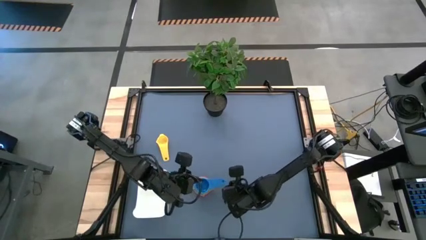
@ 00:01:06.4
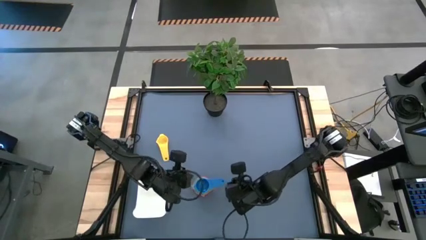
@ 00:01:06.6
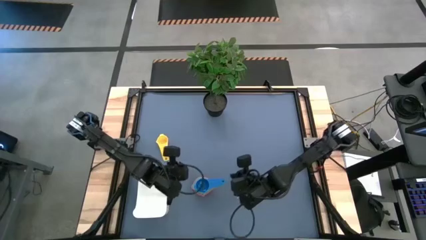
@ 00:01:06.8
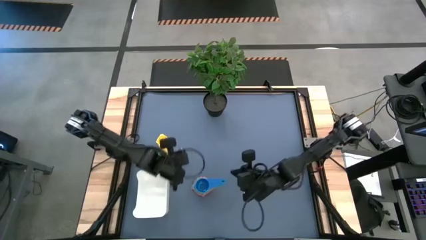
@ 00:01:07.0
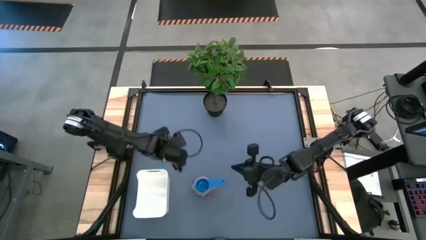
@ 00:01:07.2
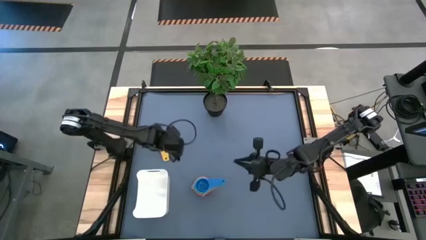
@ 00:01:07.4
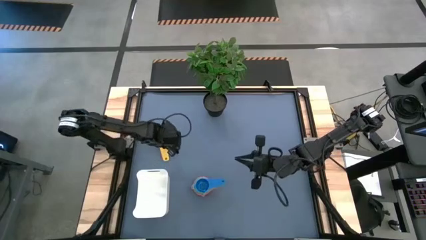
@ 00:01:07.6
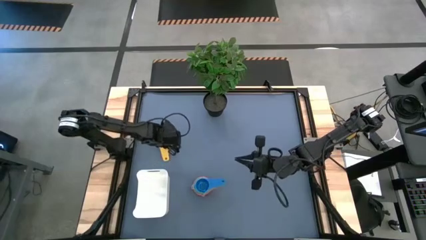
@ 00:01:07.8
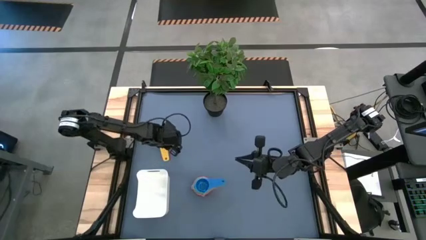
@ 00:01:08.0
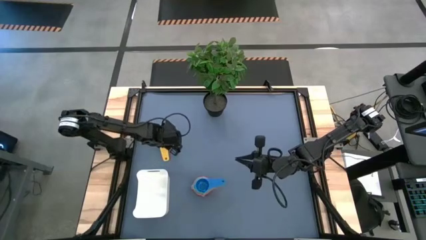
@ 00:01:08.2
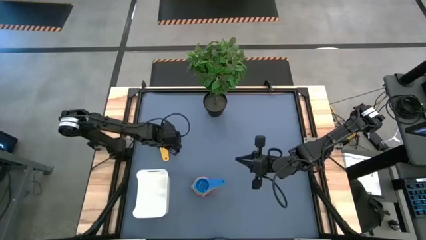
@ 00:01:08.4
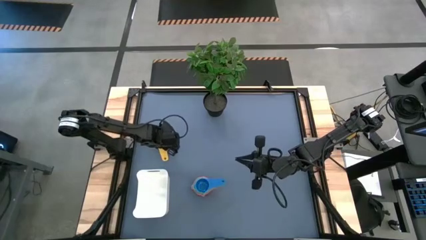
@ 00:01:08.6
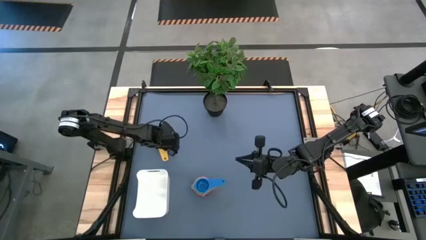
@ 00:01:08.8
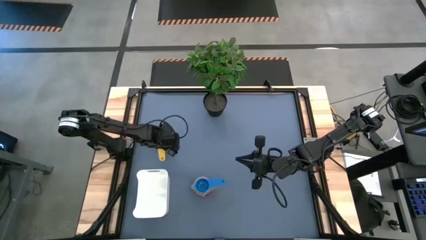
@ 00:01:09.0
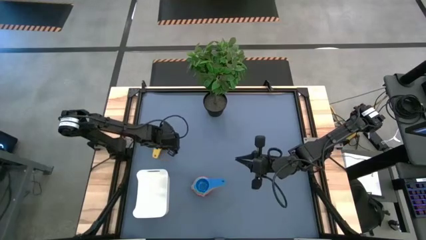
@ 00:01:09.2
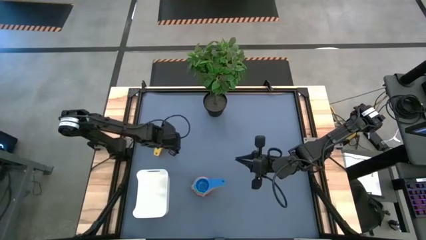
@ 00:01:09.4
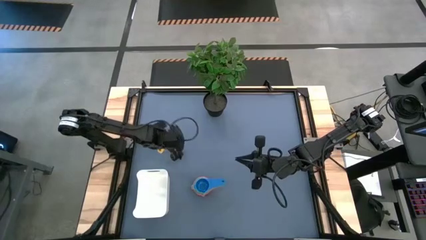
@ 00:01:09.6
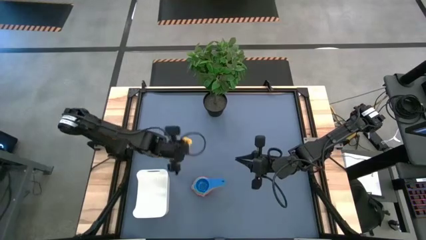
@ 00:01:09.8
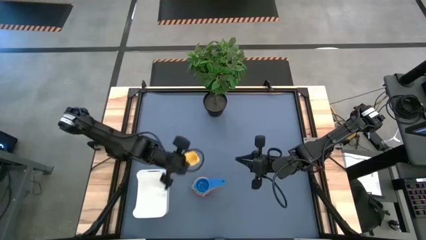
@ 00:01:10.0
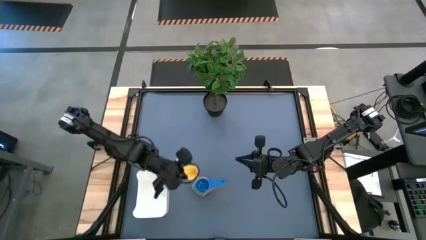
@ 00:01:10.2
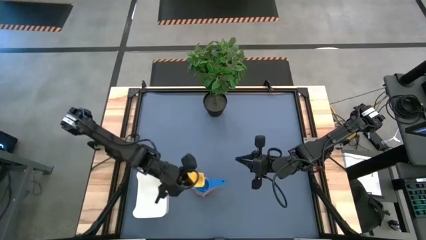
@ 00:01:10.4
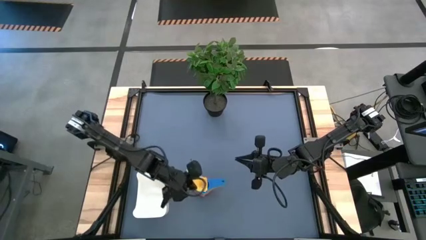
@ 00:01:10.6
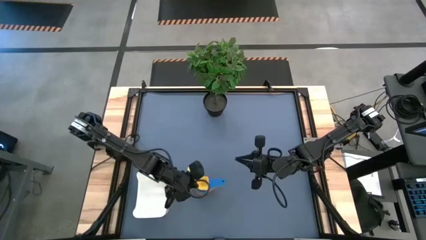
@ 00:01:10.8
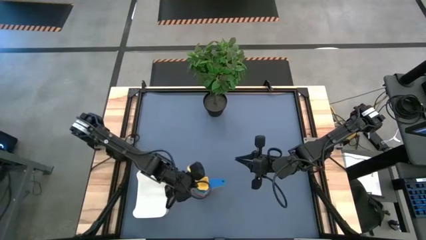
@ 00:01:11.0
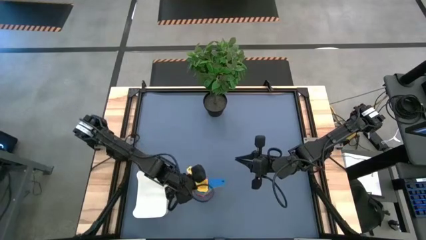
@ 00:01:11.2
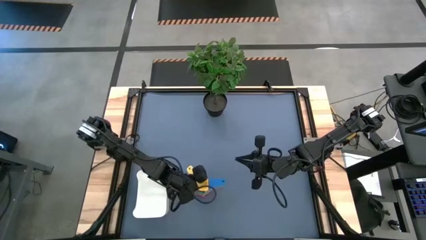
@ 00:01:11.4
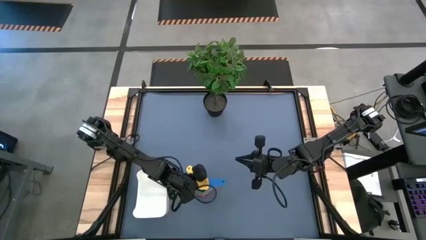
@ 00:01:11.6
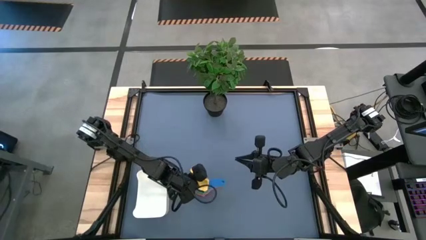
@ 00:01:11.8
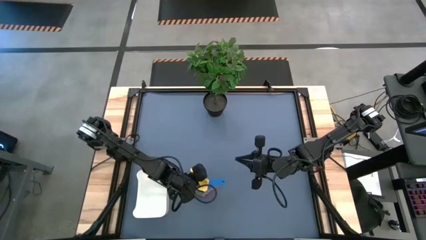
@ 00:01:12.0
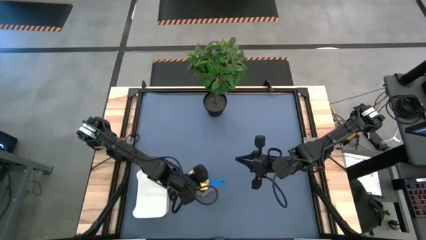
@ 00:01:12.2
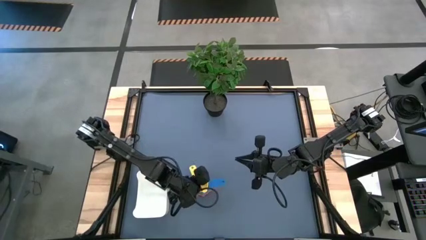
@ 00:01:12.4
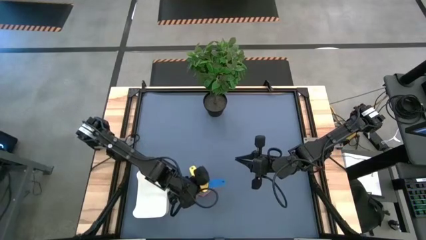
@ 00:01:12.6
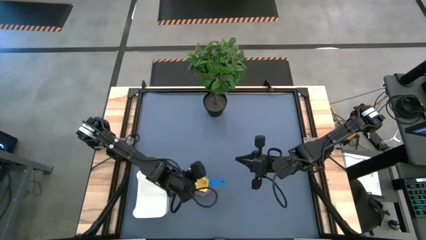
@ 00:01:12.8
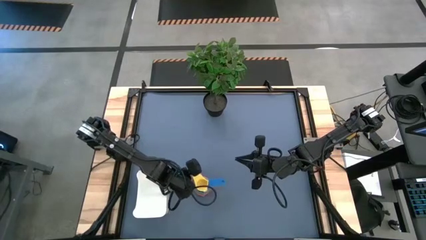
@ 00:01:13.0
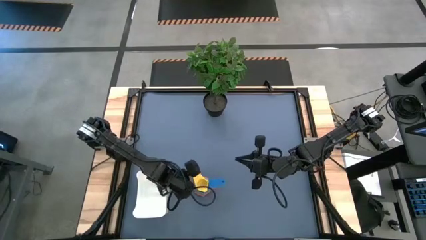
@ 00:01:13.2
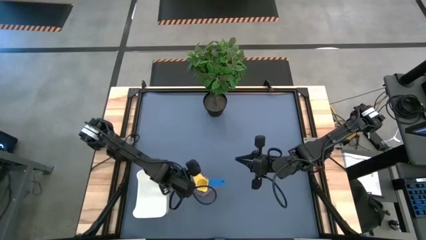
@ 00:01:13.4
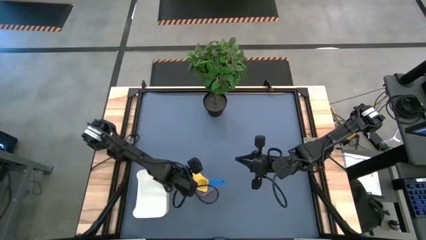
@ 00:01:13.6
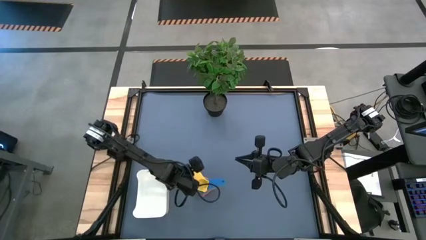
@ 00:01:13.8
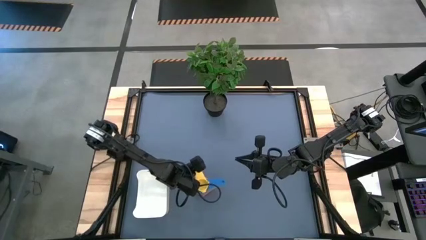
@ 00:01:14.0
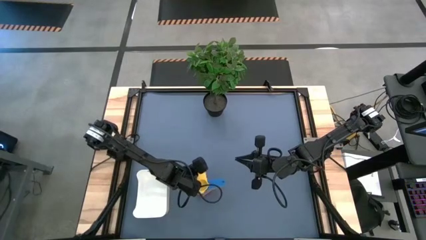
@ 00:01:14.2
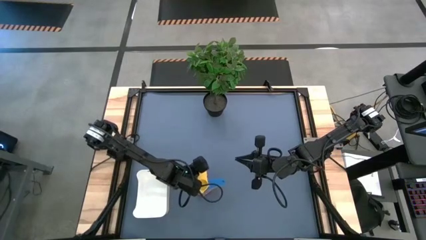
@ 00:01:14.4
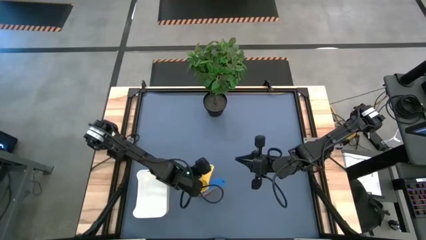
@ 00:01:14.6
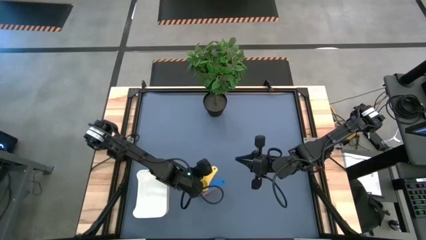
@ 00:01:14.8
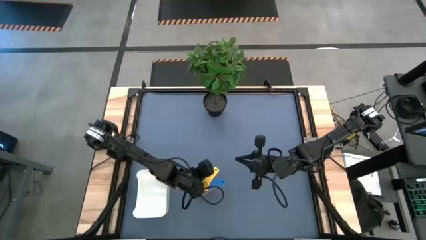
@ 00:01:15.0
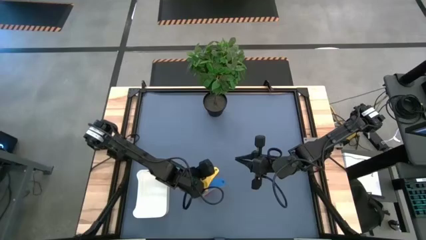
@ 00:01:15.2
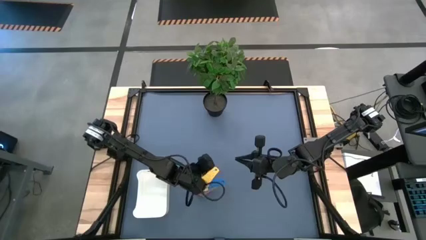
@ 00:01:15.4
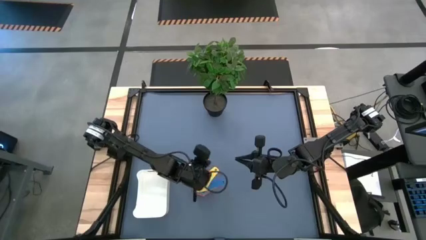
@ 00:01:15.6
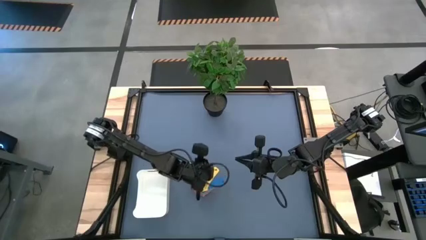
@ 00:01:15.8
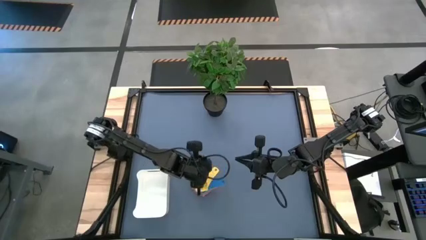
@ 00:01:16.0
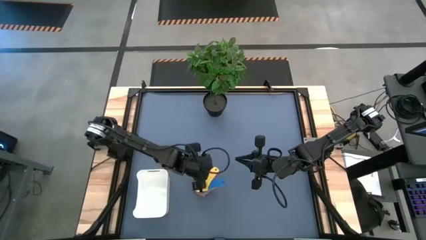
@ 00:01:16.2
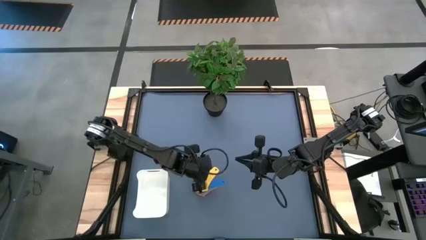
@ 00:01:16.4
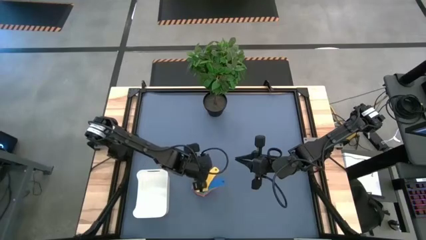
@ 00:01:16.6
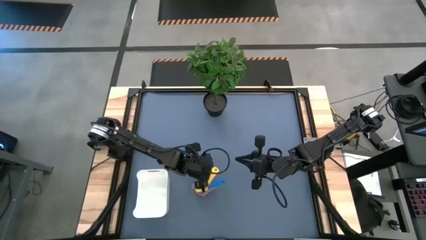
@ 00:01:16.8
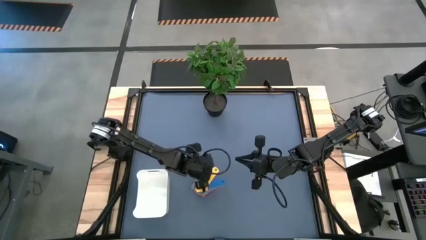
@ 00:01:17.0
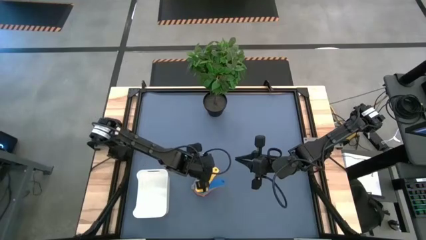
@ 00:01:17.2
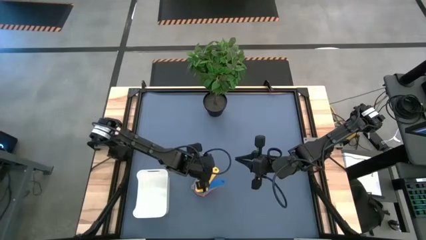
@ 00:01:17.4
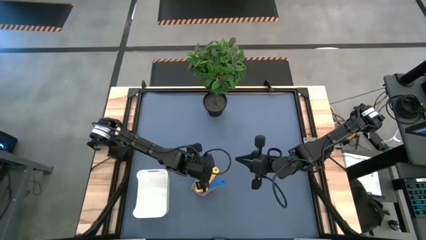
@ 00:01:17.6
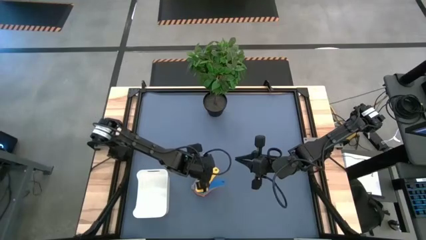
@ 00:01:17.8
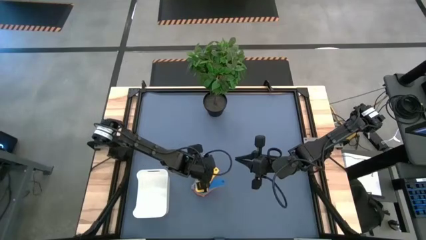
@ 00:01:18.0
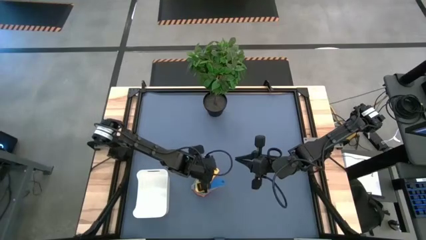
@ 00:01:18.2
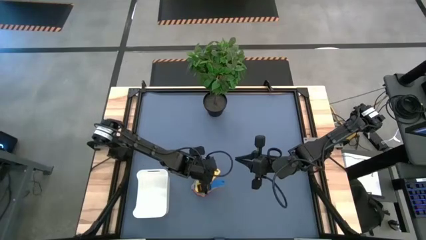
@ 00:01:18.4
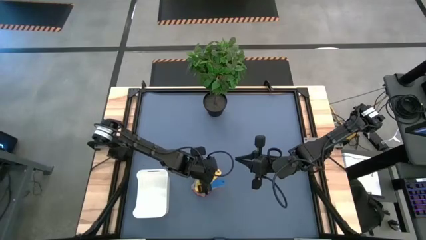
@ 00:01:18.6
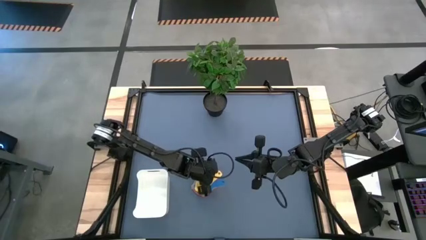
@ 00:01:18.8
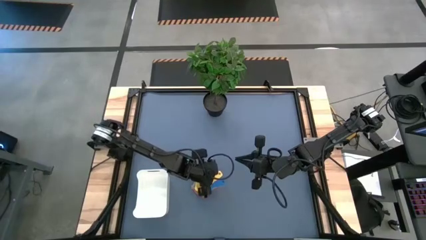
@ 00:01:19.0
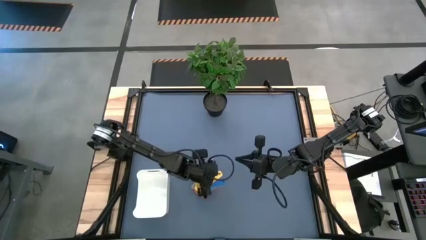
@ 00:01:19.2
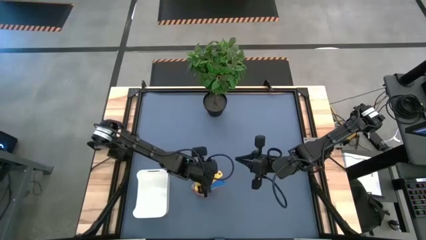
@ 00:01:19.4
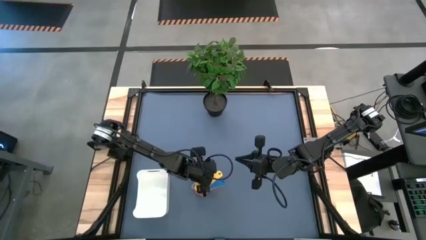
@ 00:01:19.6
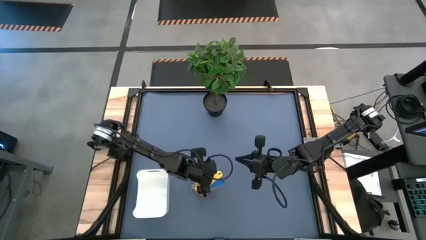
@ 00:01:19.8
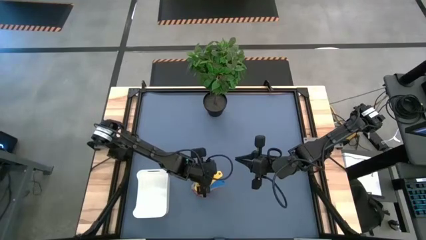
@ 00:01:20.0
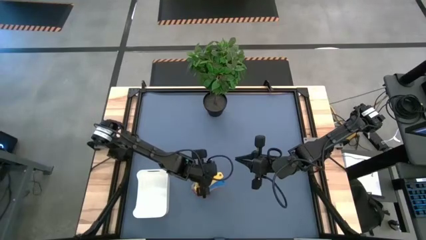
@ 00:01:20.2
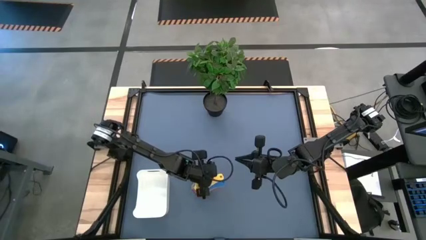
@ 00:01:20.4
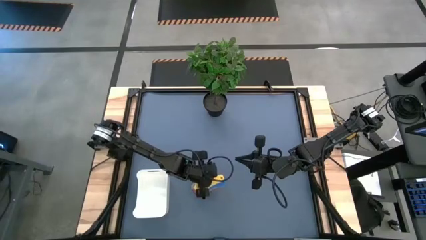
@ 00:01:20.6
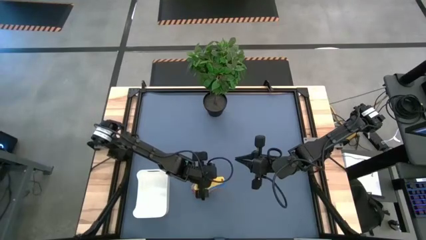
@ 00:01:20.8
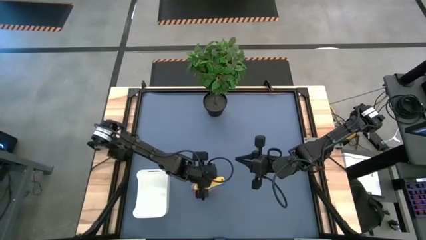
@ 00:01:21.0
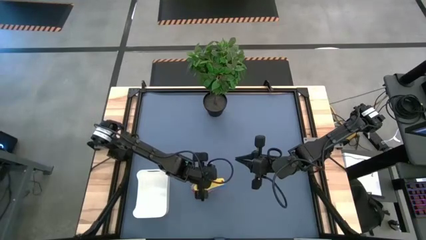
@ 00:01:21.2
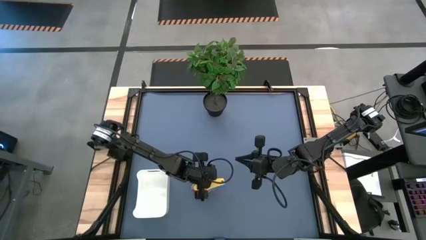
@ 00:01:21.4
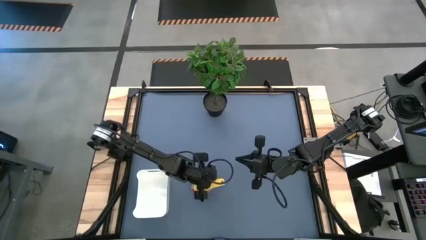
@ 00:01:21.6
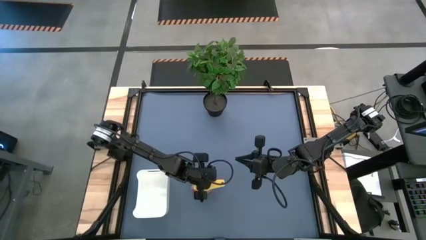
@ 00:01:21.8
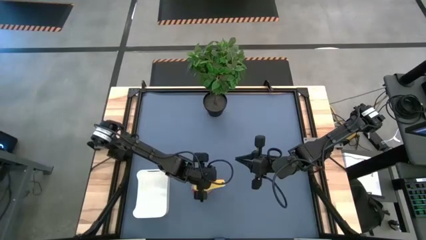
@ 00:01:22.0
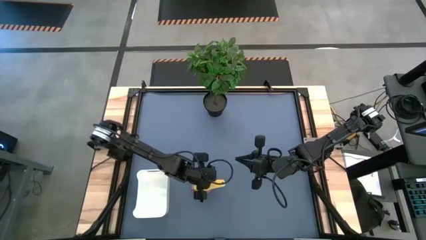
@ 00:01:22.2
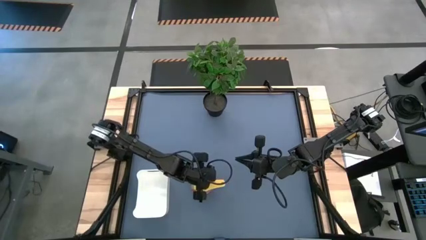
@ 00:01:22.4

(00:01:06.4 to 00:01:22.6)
Task: Nest measuring cups in basket
Stack the yellow measuring cup on the blue measuring cup
